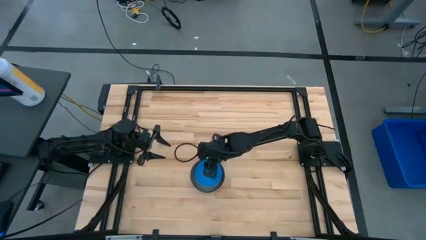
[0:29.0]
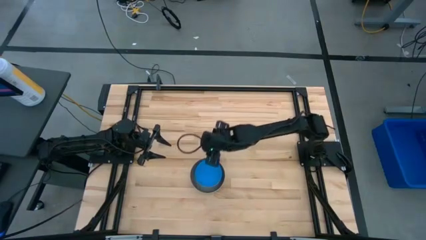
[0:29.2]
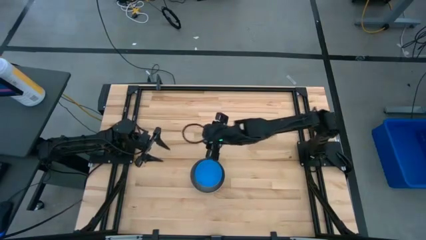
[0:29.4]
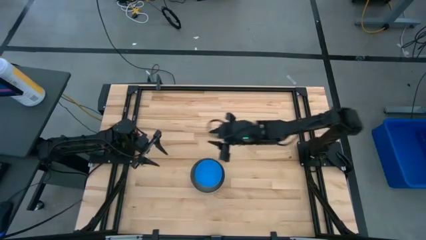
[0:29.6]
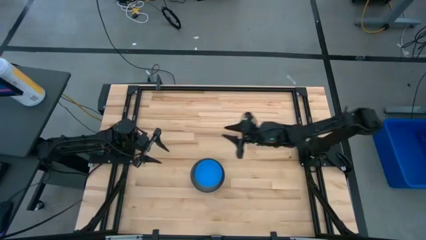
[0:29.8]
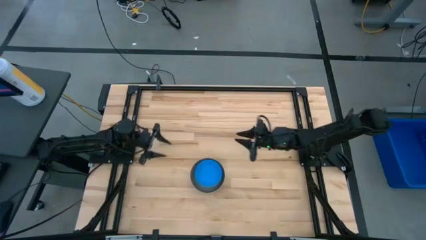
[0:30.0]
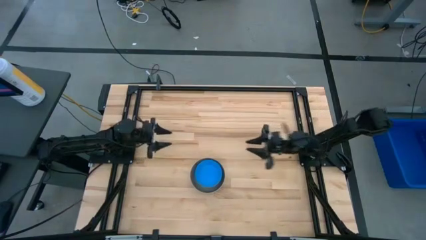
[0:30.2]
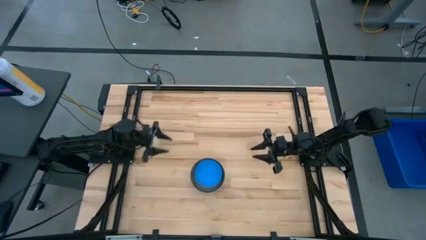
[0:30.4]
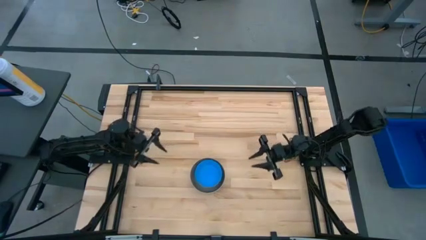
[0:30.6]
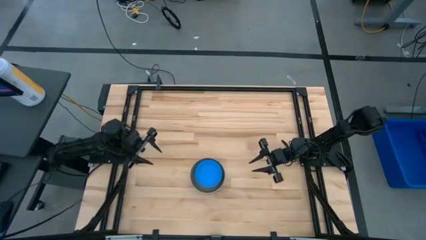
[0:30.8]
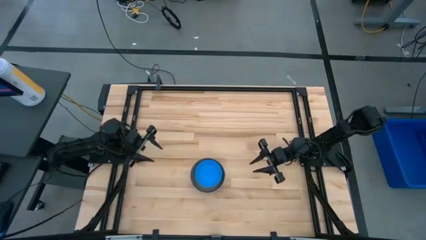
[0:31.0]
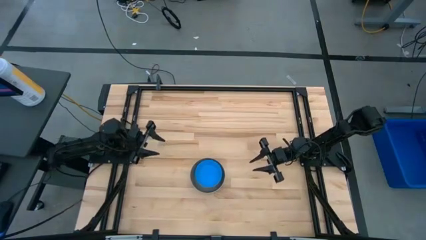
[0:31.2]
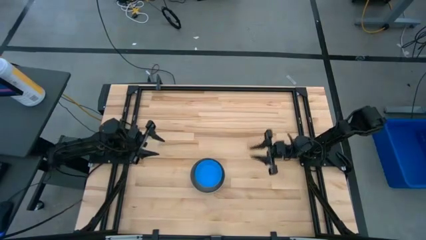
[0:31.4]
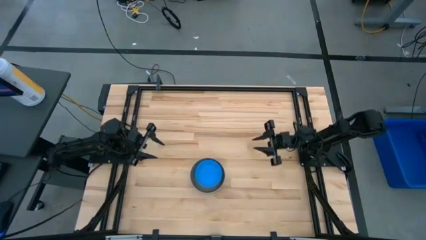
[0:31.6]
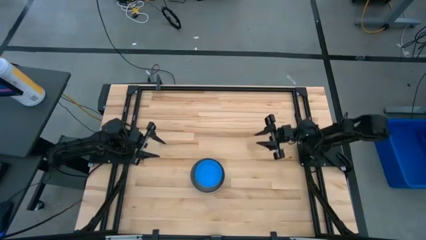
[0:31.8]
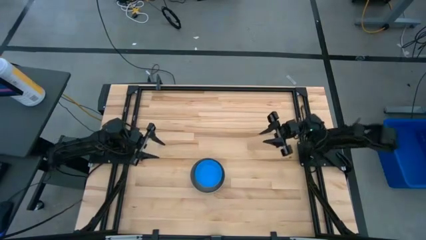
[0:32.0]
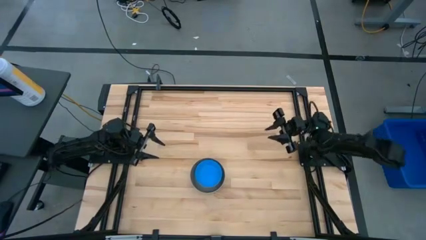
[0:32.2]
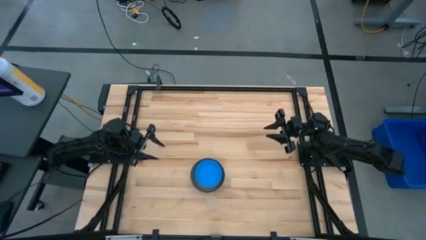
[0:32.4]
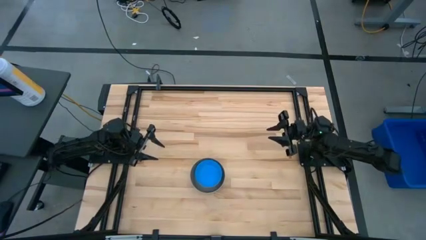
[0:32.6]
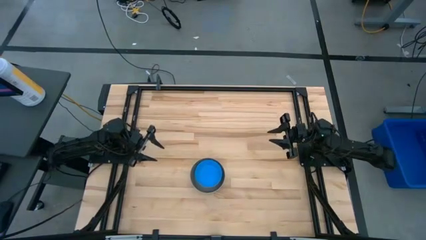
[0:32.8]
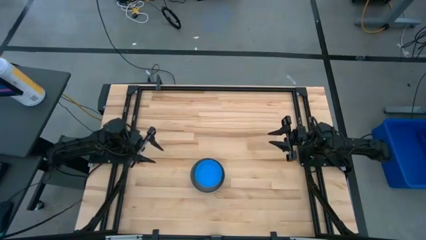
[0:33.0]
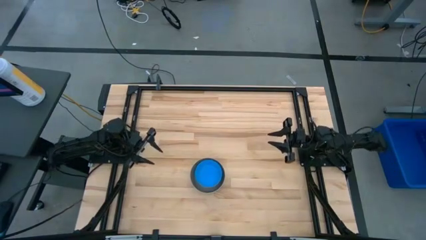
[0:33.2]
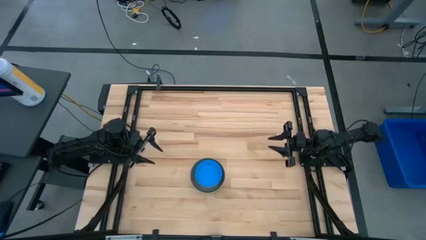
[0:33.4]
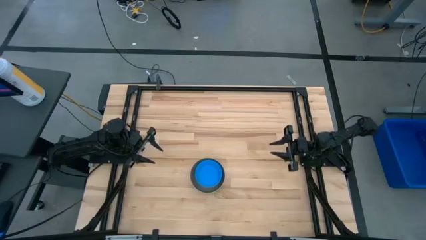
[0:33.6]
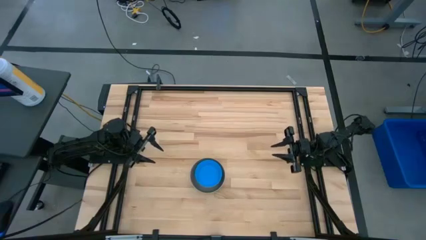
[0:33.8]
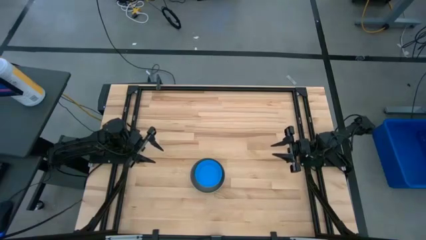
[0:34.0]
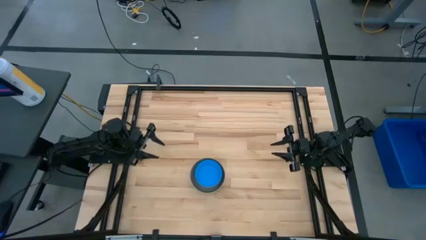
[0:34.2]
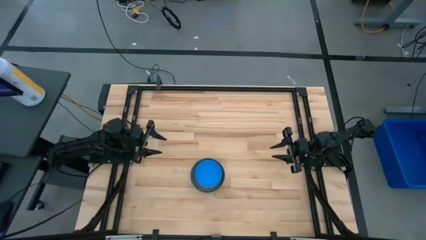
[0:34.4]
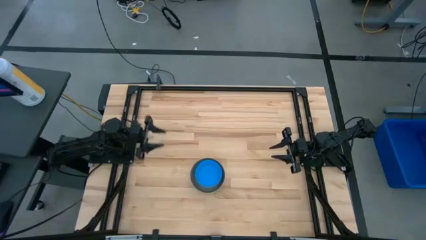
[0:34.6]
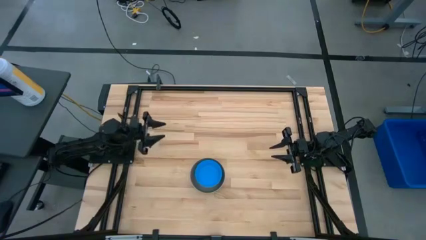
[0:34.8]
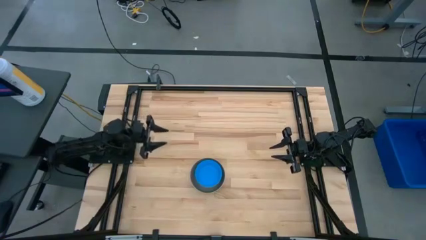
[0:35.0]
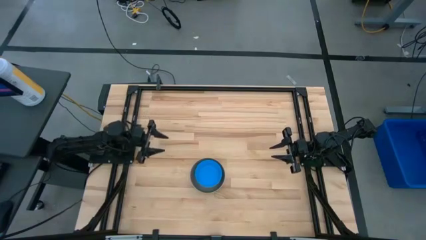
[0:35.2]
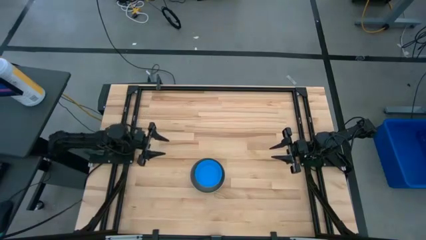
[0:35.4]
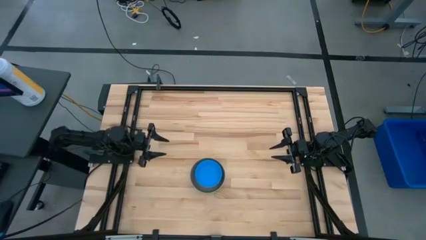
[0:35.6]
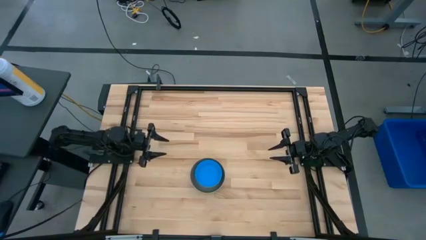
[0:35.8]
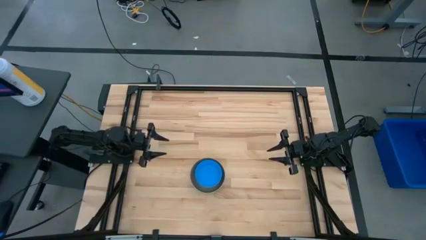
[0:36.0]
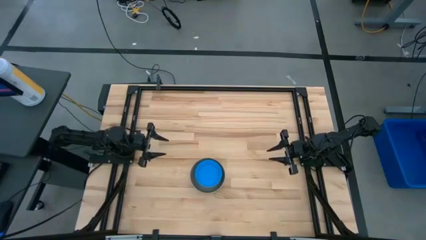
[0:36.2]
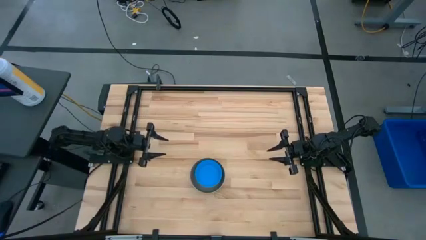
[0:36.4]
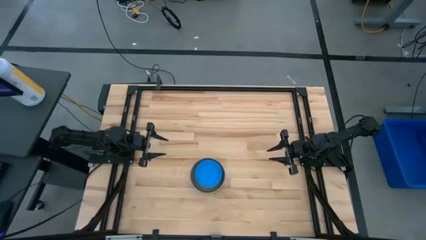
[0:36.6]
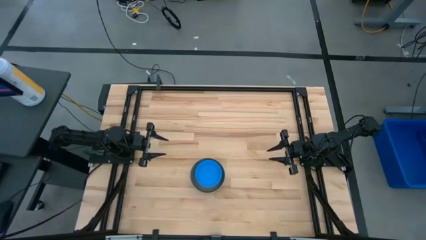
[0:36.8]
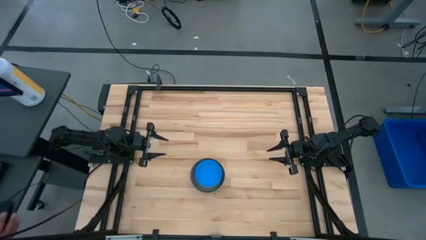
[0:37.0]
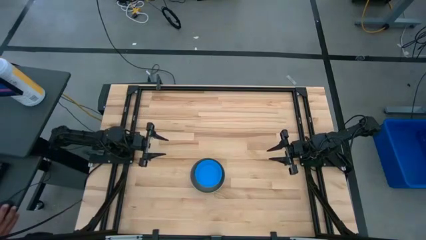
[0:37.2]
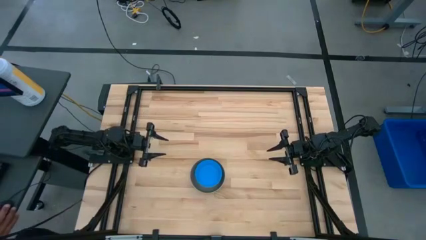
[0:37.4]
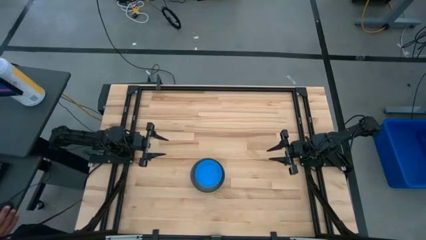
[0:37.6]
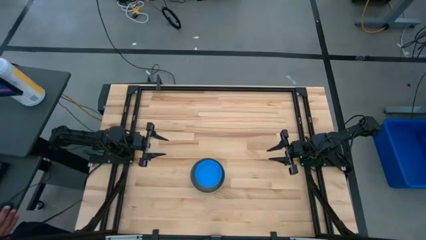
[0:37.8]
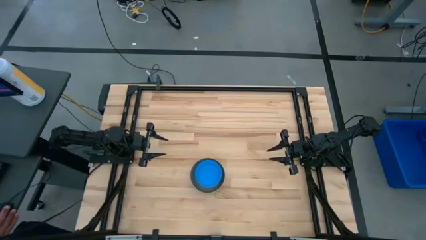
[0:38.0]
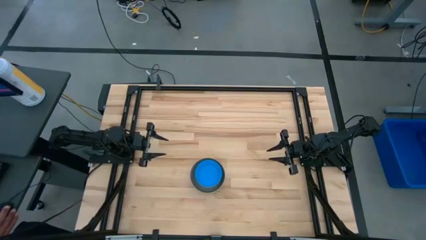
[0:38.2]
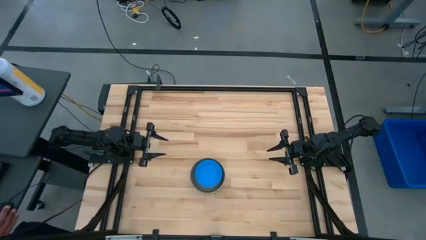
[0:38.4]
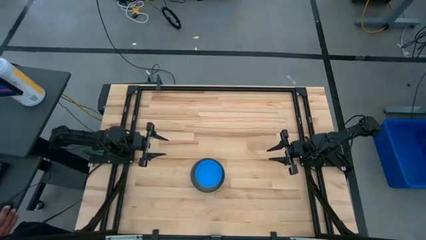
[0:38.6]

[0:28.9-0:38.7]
Return to Home Position

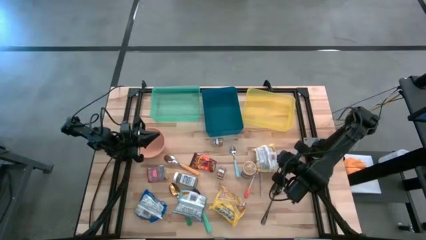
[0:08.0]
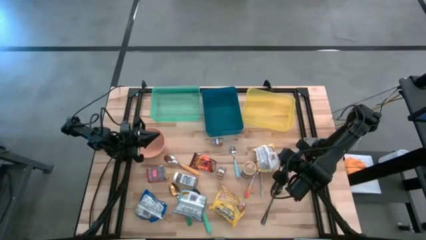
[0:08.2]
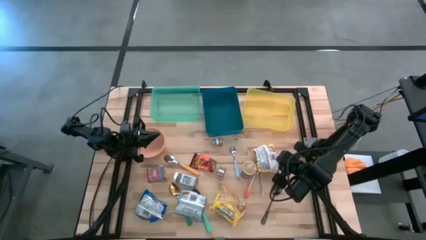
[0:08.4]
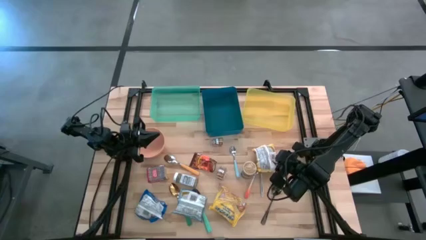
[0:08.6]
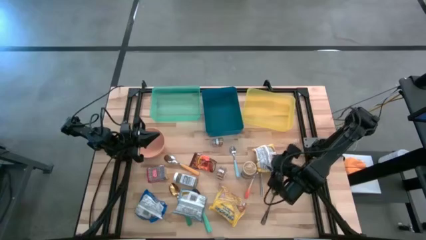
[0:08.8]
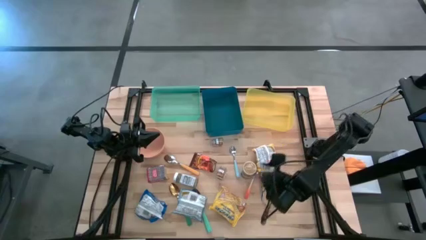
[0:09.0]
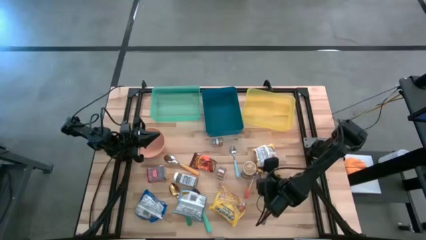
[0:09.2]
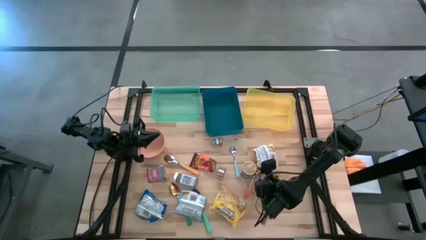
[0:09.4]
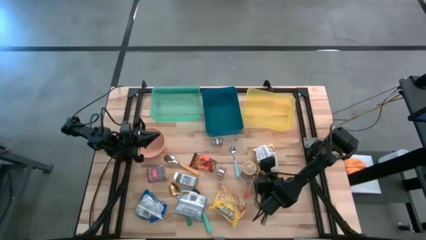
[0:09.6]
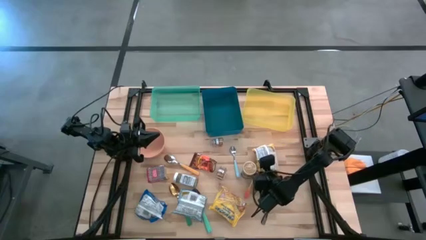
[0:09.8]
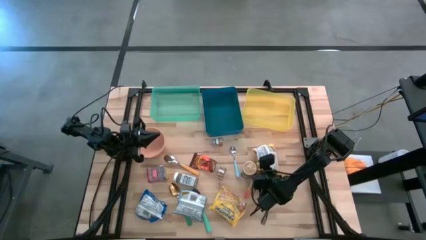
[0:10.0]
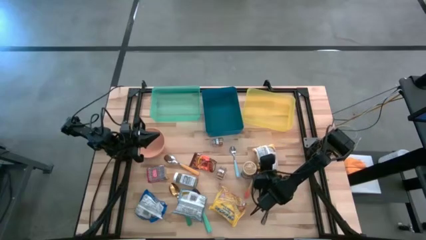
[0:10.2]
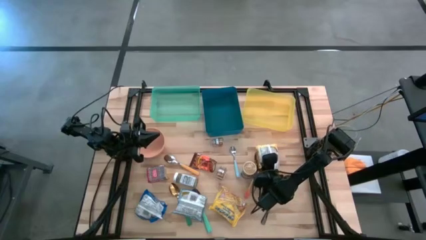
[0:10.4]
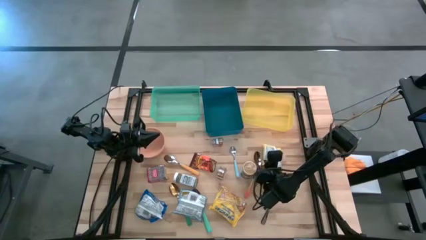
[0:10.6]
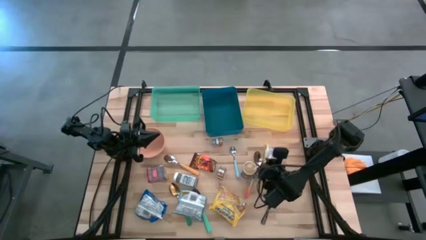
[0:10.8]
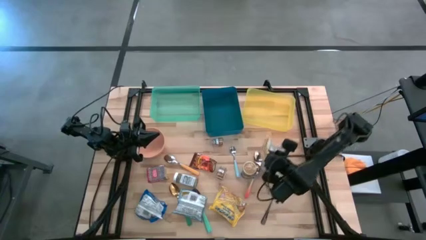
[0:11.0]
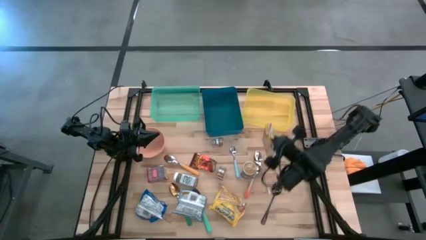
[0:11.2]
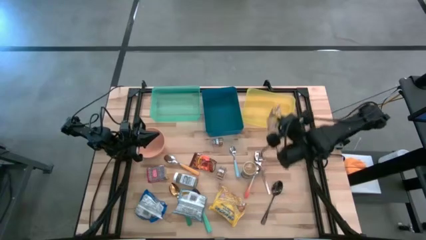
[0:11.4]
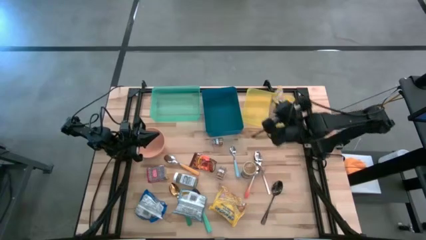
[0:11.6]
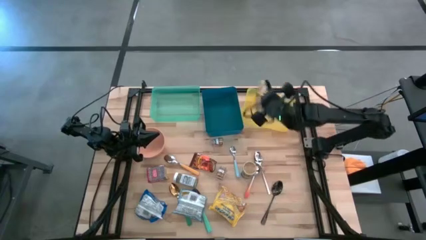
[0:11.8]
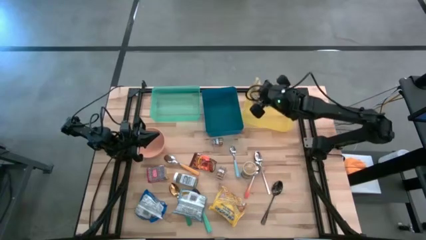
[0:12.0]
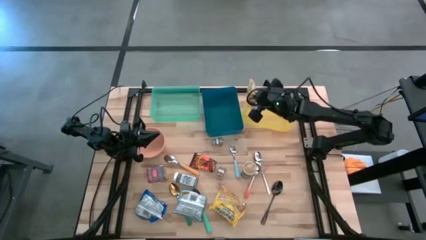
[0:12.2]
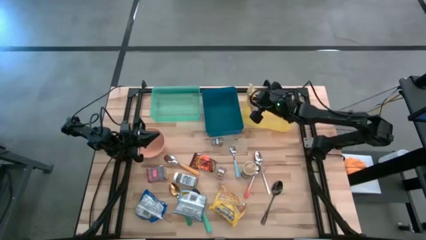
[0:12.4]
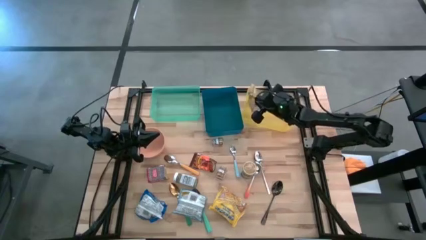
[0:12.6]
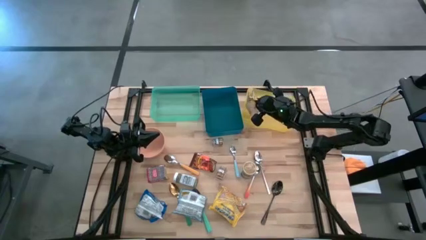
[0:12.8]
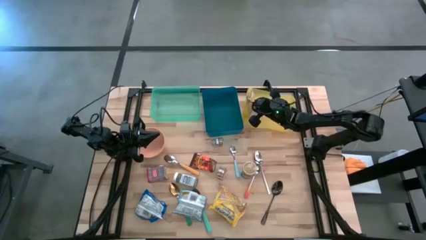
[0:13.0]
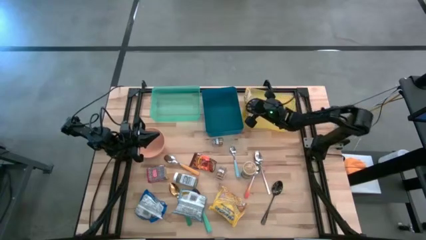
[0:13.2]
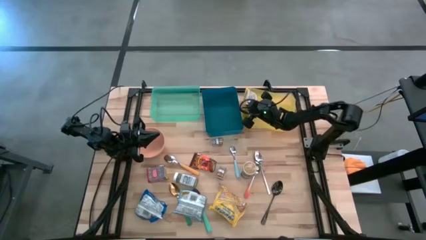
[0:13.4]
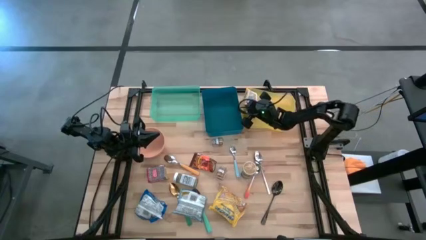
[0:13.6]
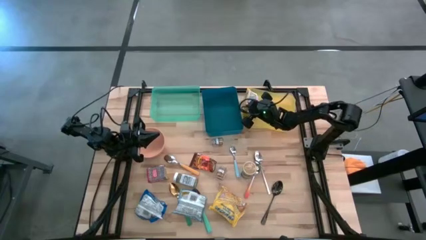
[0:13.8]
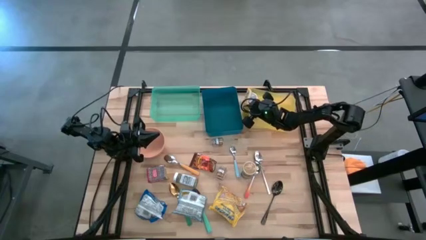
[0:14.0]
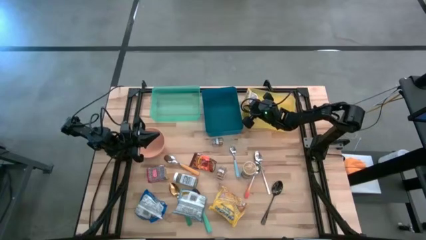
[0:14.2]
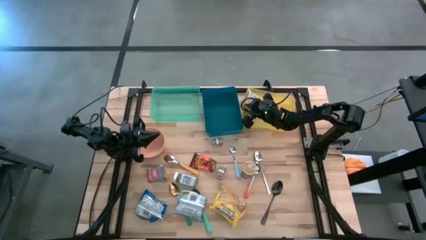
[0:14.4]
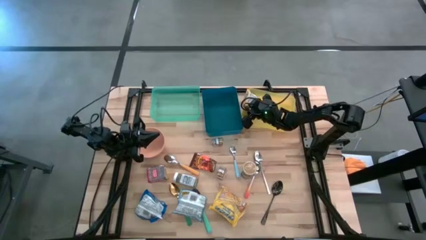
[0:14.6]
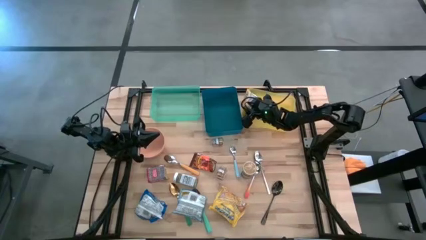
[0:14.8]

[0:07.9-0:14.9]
Put the top yellow noodle pack into the yellow bin
